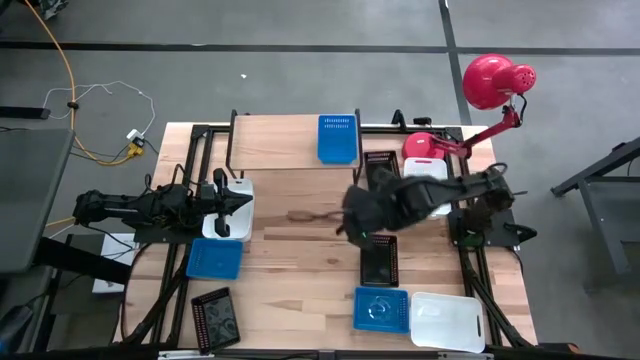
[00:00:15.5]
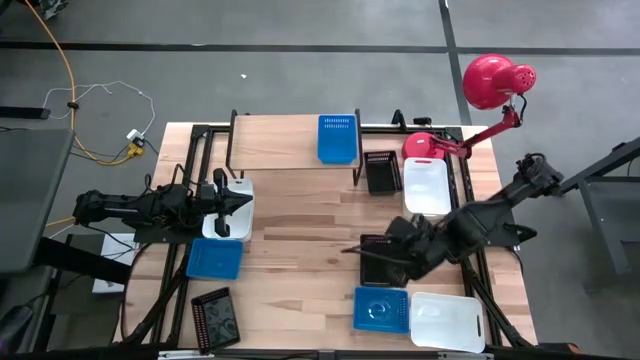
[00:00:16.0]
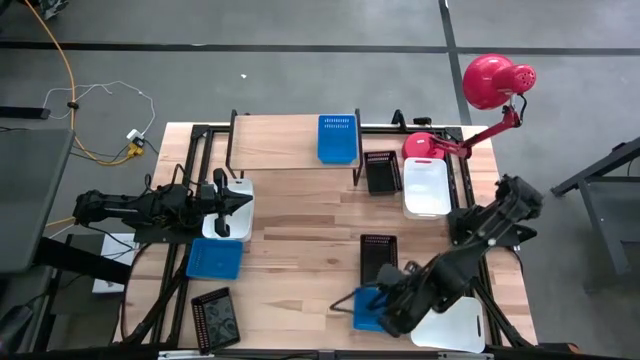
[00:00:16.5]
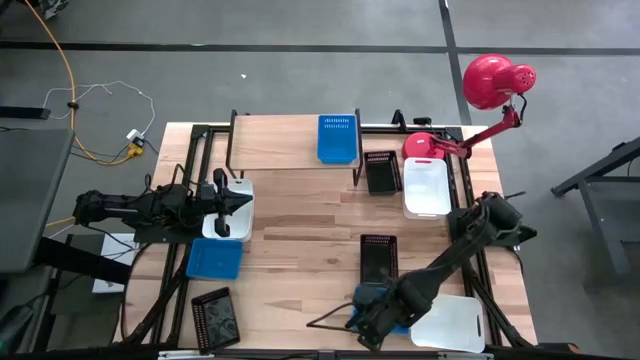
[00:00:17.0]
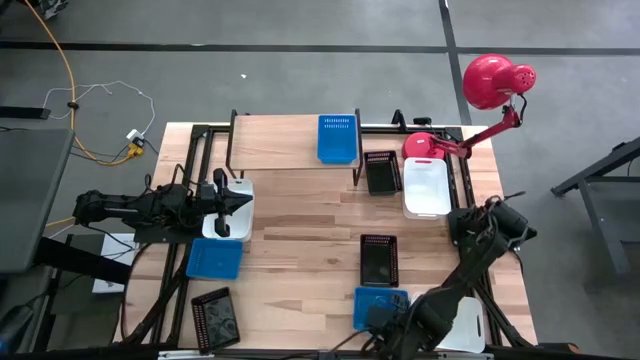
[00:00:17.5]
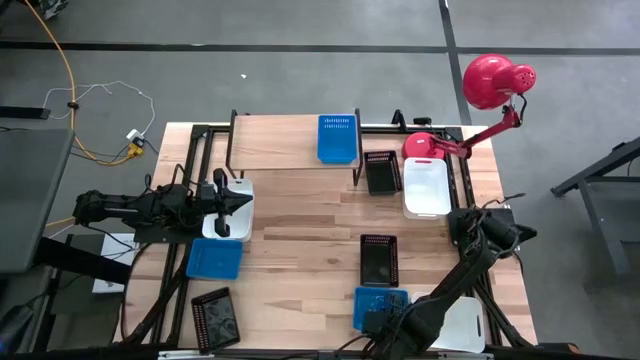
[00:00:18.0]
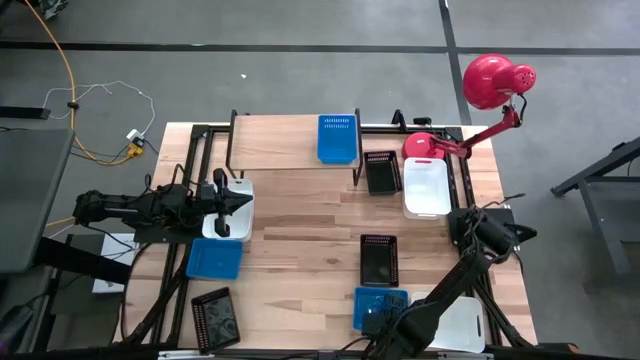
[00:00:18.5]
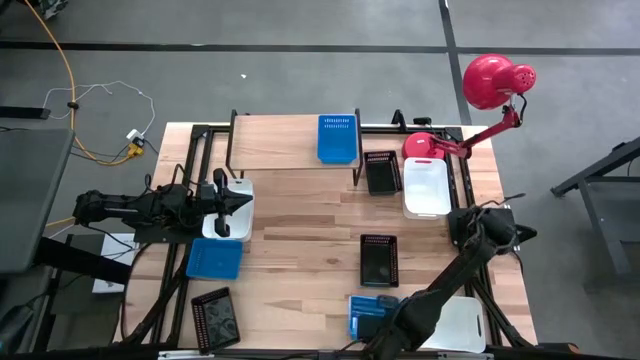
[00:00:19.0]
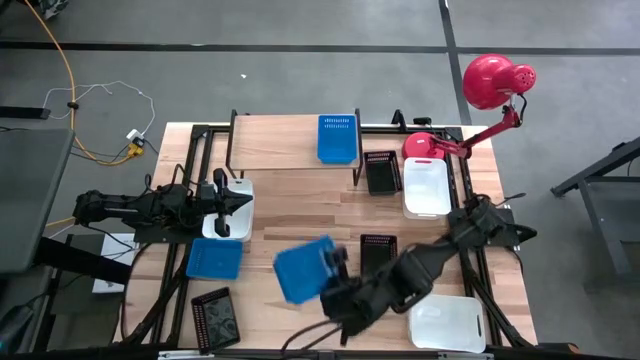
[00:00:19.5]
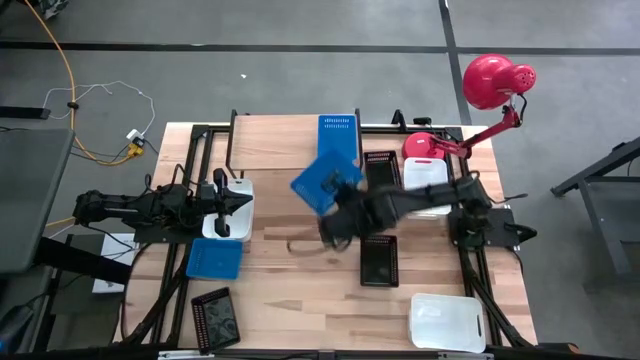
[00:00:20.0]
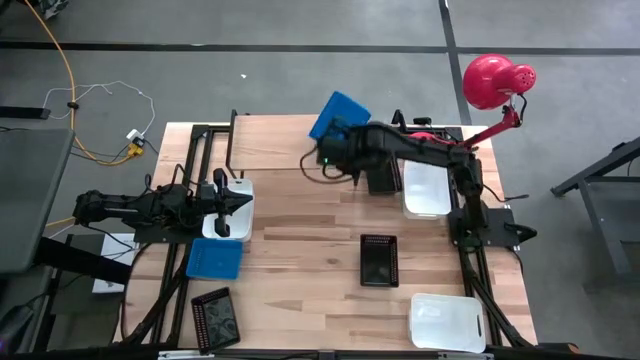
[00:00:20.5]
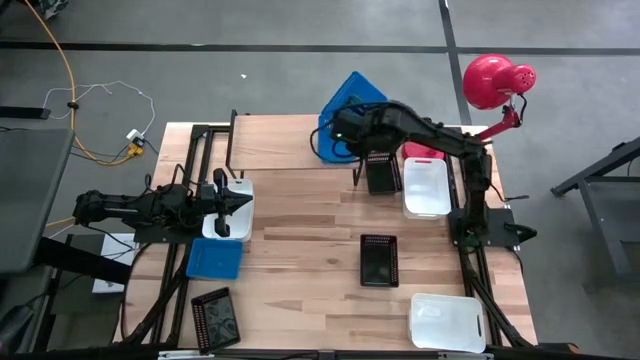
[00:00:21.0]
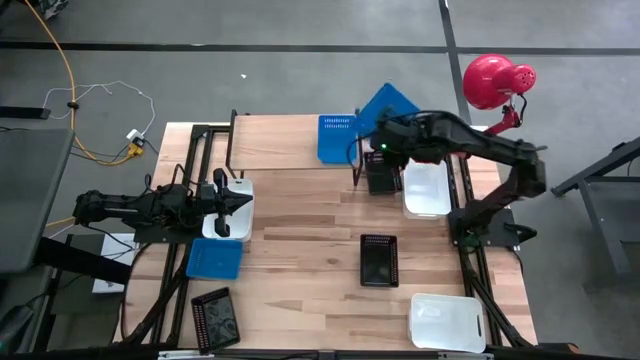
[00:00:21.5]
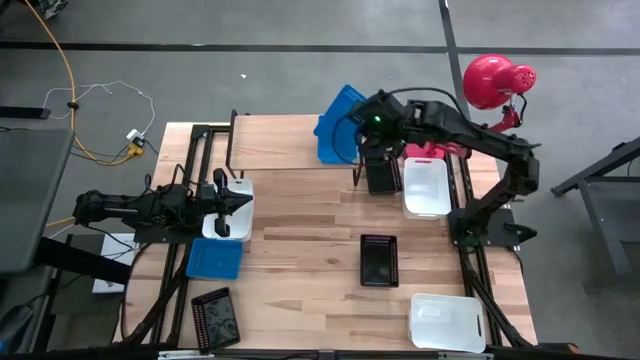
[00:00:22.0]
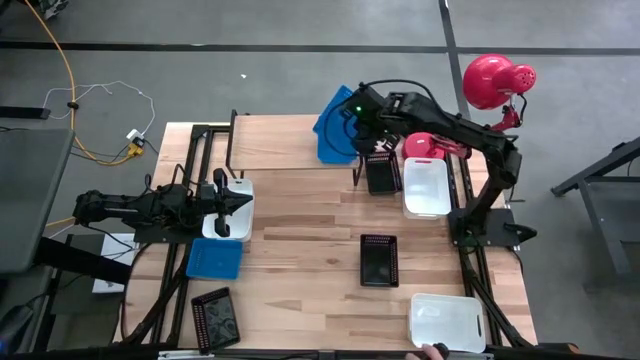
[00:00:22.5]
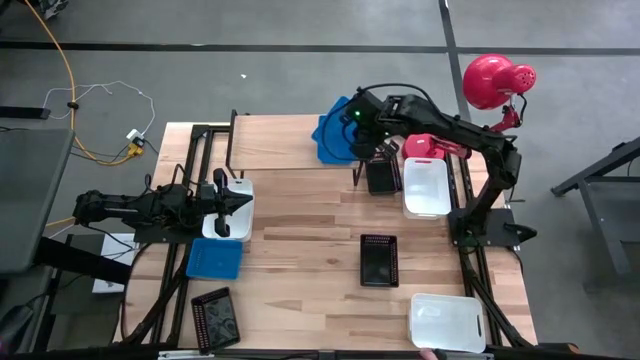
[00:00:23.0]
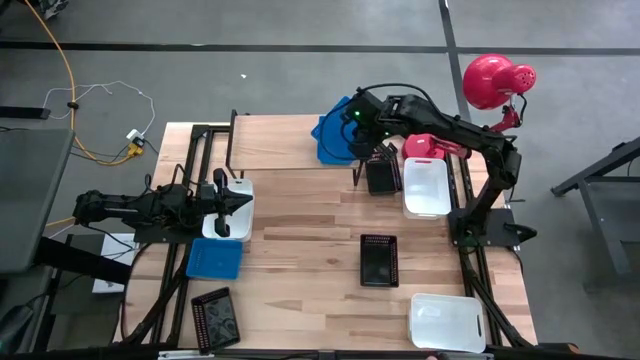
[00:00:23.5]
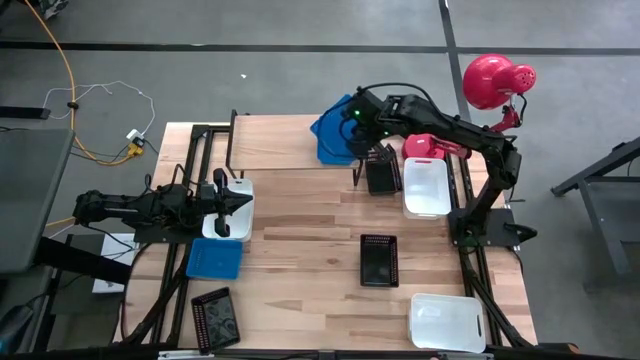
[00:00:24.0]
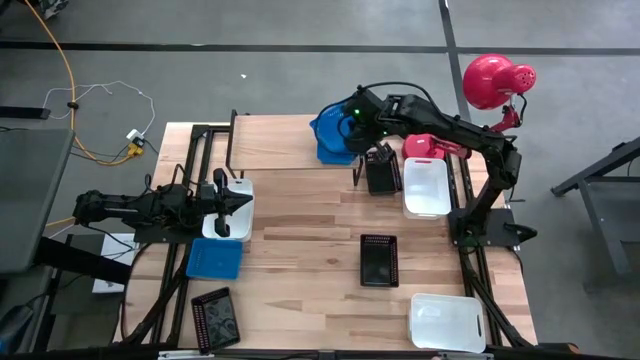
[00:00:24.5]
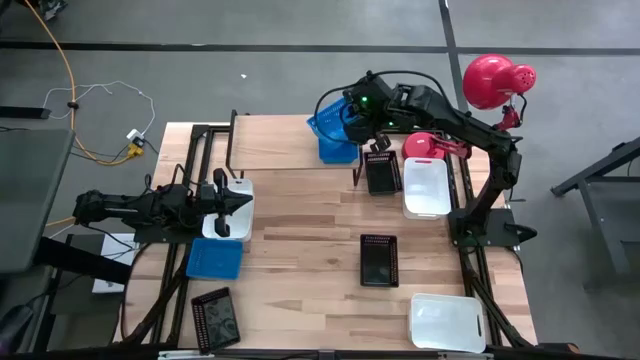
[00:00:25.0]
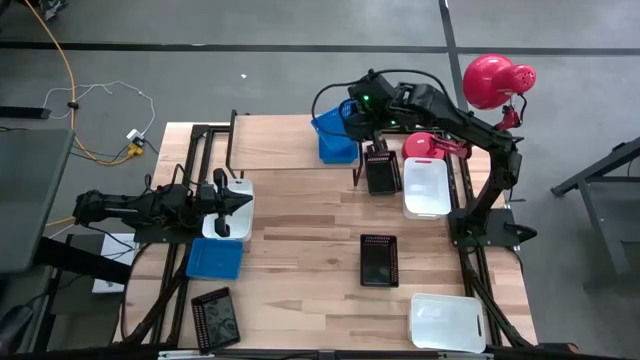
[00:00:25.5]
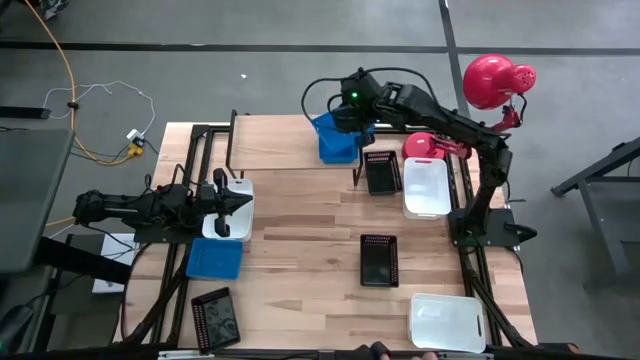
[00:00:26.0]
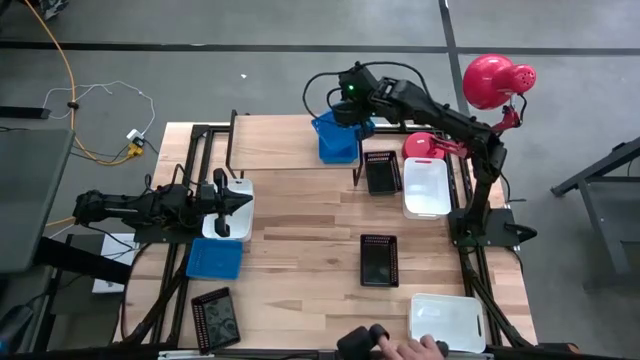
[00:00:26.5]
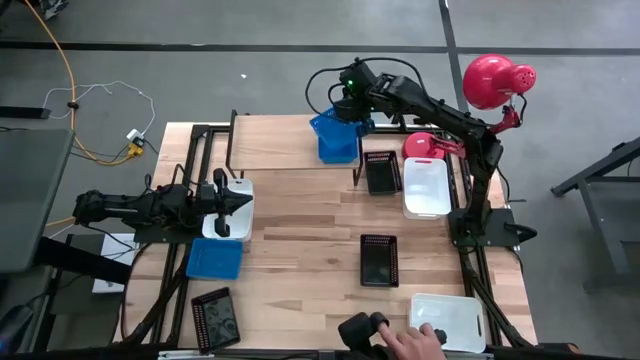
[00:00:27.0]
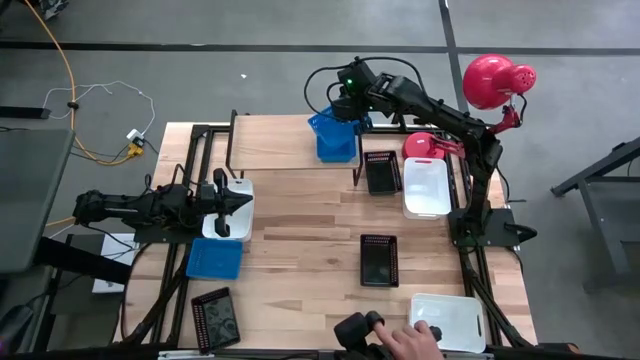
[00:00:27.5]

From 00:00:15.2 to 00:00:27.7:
Task: Stack baskets on shelf by color
Stack the bottom right blue bin on the blue bin on the shelf

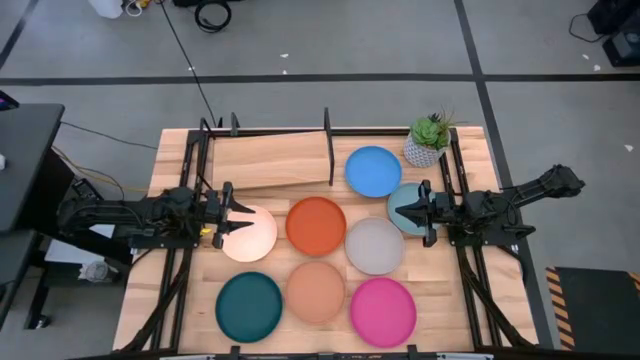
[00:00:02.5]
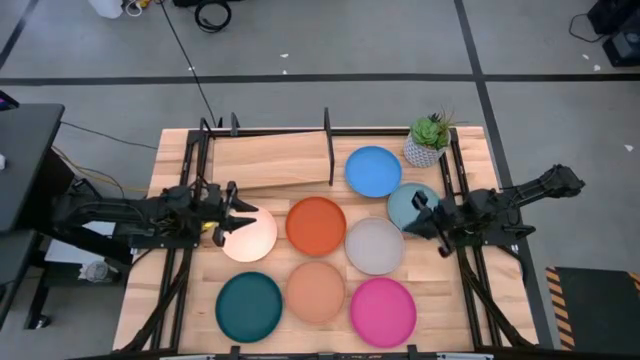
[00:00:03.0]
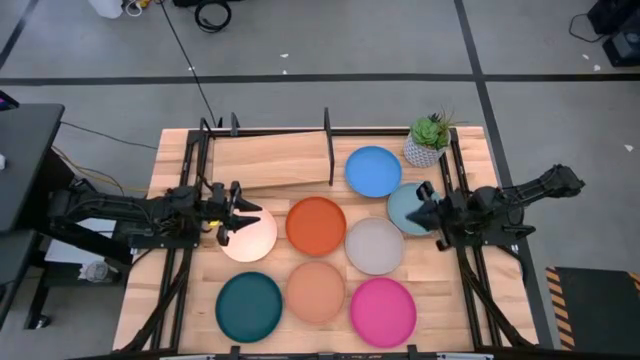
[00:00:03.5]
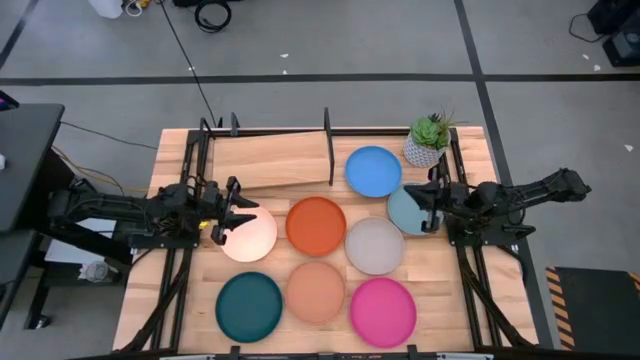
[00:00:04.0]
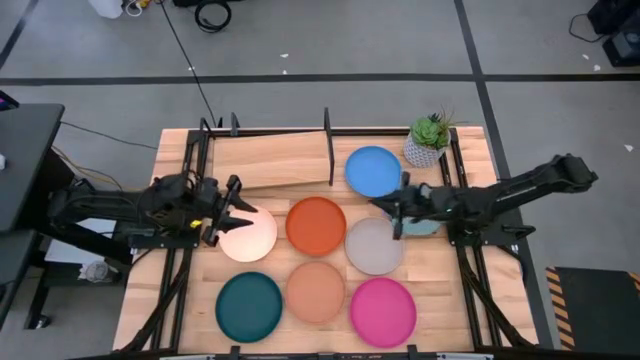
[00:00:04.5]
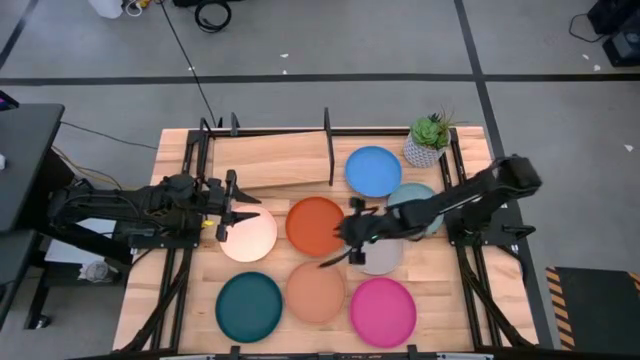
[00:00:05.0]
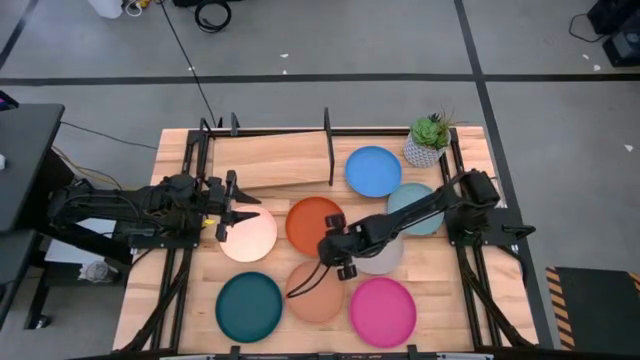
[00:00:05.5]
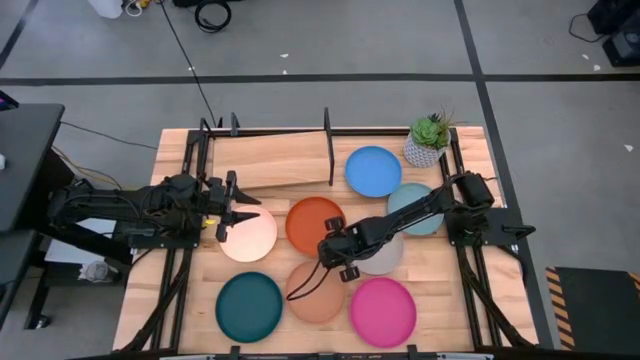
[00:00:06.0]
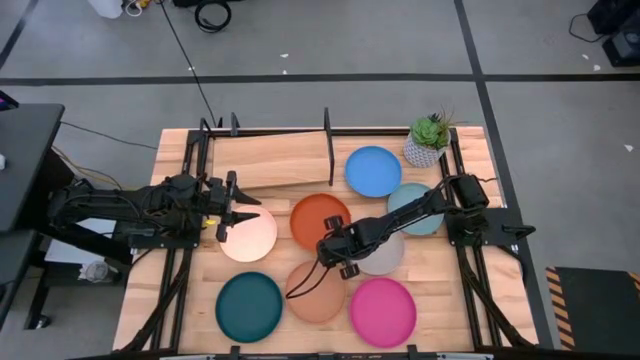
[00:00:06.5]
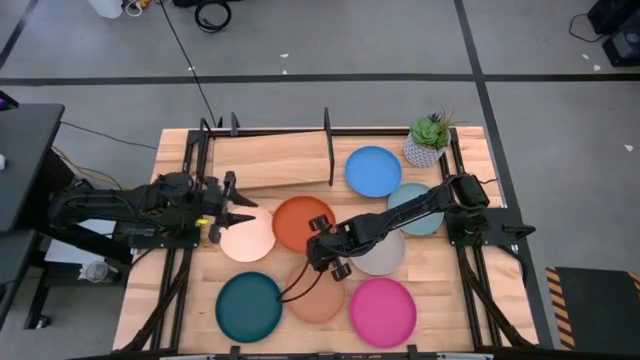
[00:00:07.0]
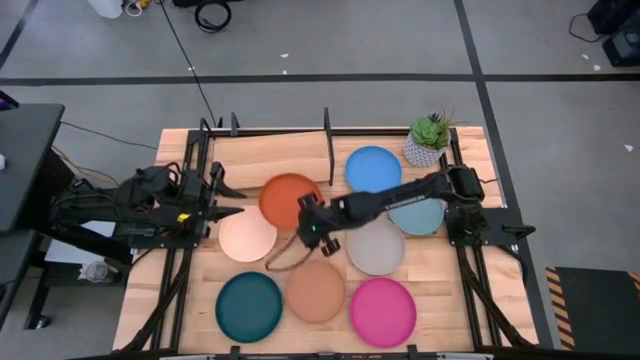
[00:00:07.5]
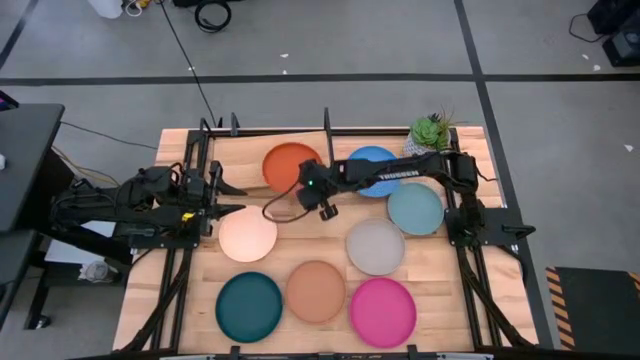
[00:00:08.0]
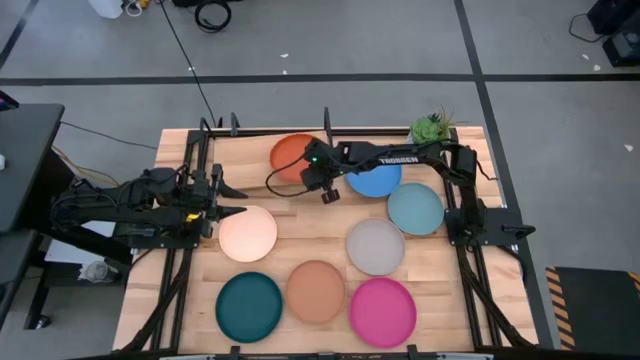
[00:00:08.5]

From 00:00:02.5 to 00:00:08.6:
Task: Place and stack plates onto a shelf
Put the orange plate on the shelf

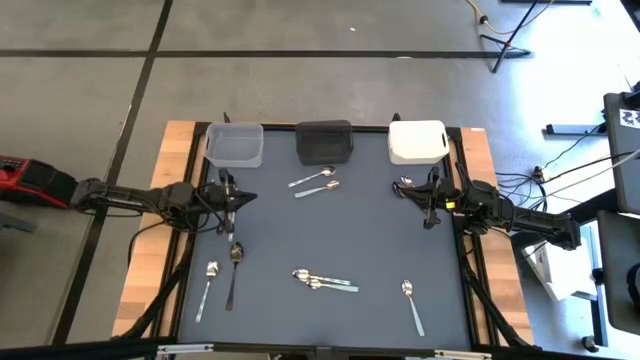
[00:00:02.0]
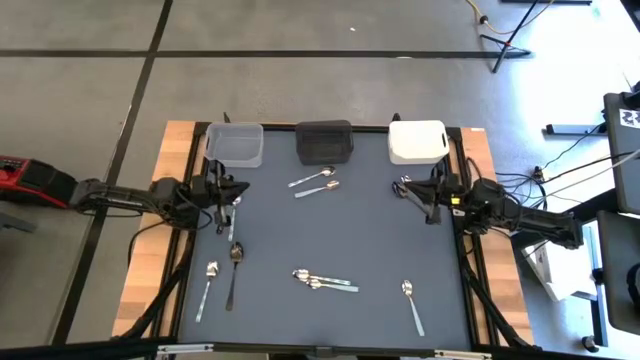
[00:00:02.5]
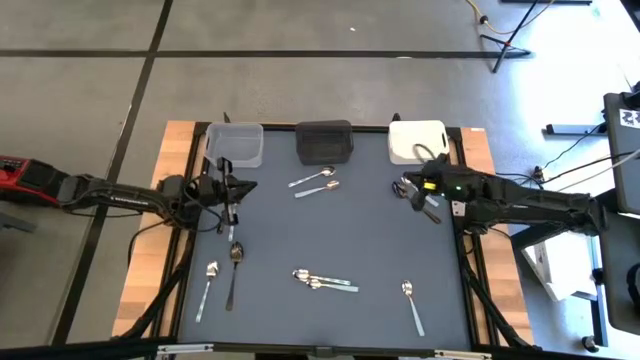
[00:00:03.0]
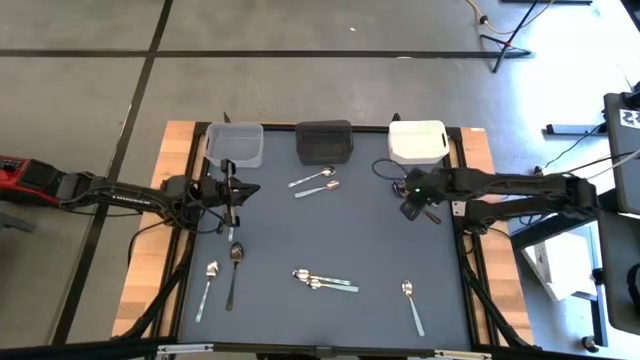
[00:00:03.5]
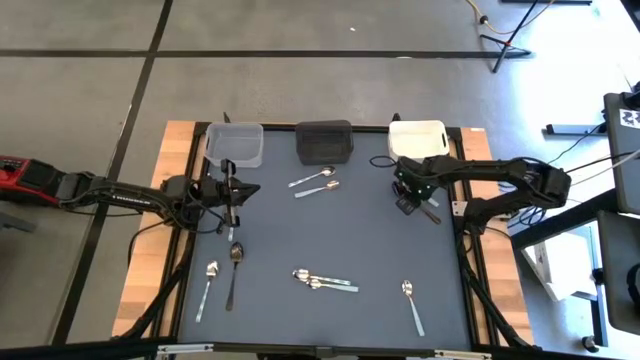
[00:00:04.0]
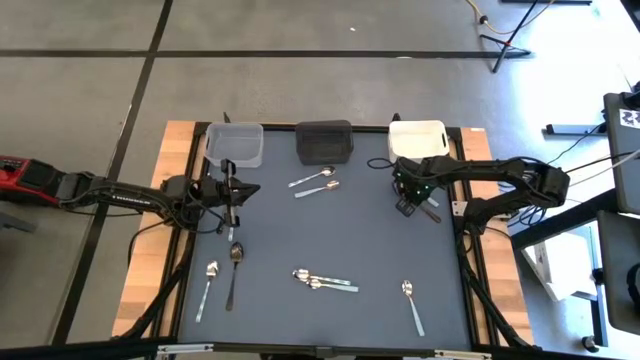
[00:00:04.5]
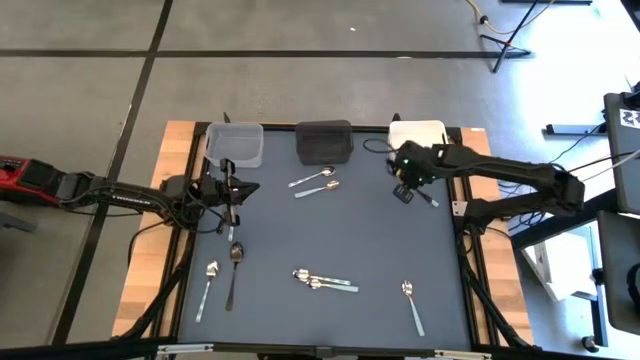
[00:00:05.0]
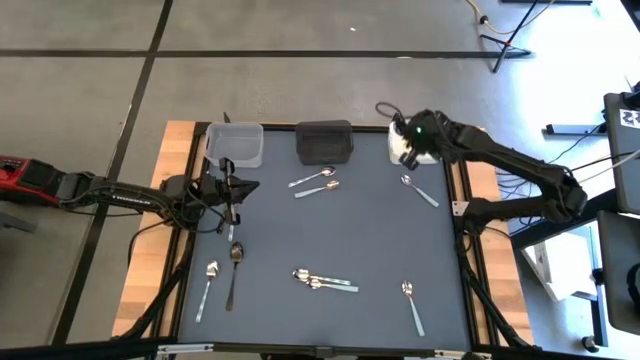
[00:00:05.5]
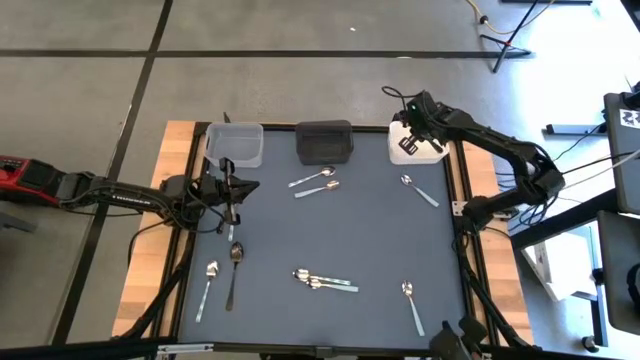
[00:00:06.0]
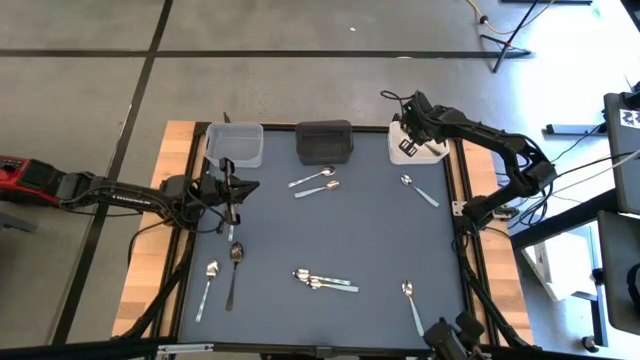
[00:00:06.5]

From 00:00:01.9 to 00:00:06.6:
Task: Sort silverware by color (type)
Put the black spoon into the white bin
